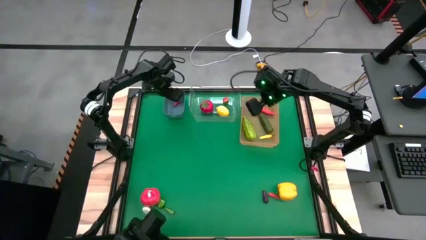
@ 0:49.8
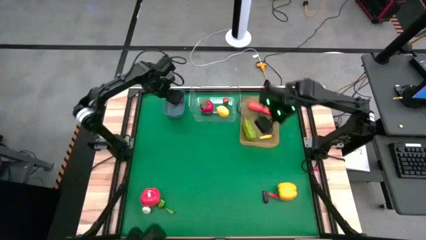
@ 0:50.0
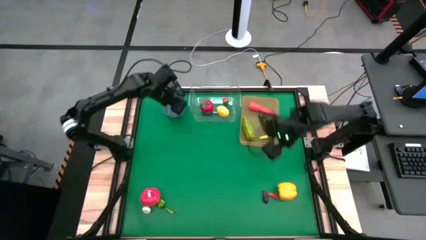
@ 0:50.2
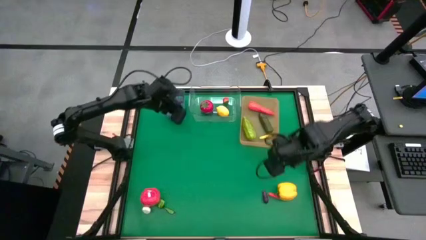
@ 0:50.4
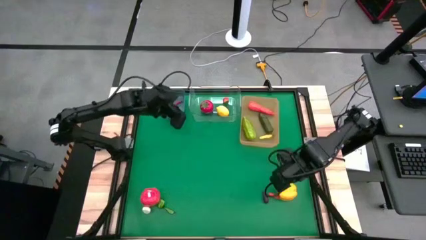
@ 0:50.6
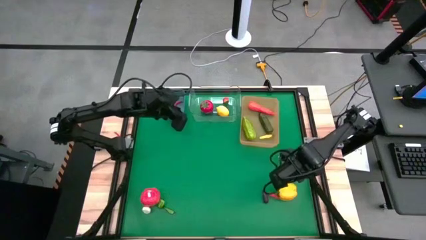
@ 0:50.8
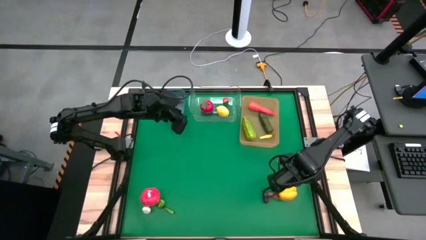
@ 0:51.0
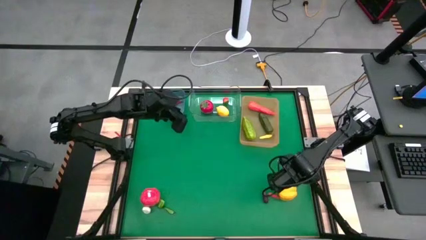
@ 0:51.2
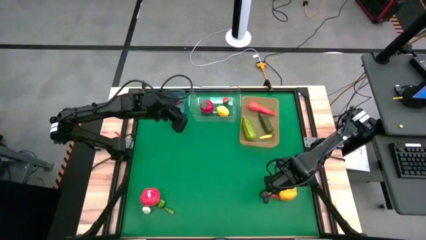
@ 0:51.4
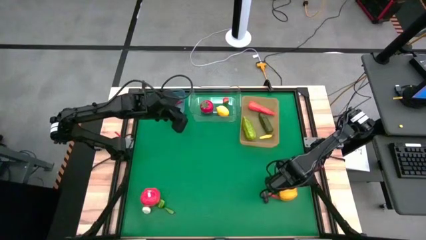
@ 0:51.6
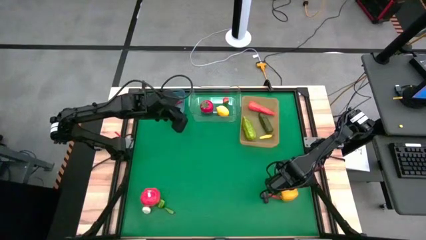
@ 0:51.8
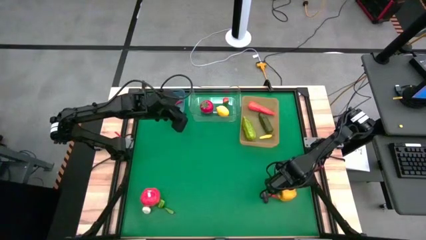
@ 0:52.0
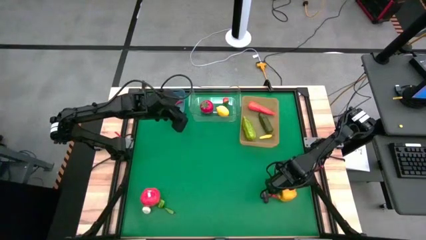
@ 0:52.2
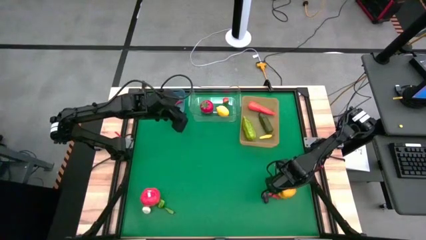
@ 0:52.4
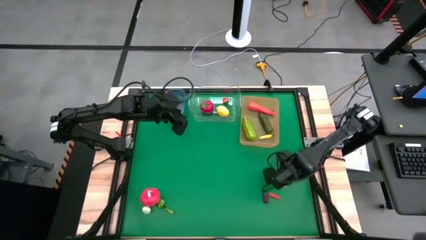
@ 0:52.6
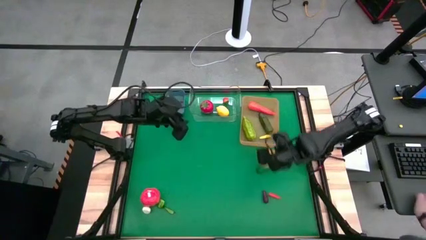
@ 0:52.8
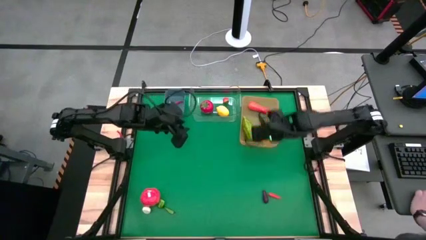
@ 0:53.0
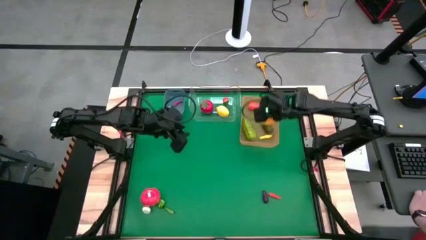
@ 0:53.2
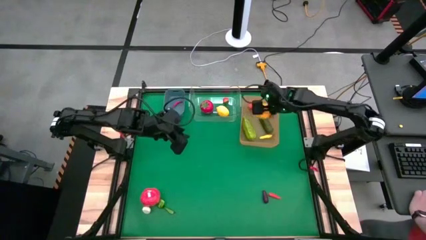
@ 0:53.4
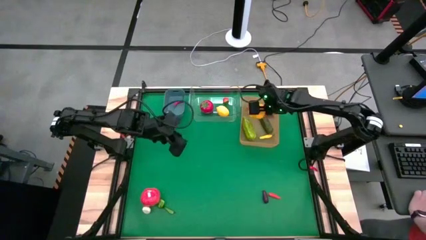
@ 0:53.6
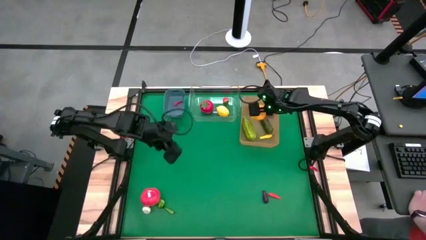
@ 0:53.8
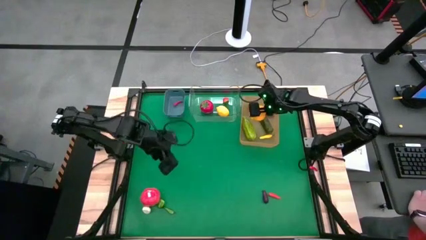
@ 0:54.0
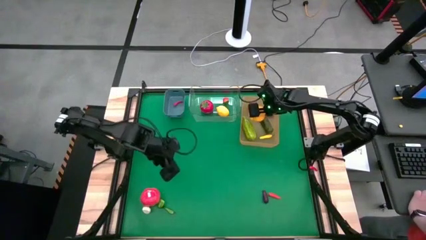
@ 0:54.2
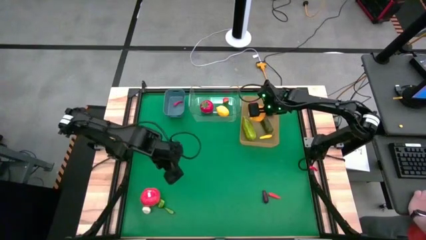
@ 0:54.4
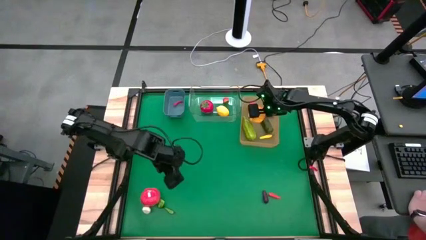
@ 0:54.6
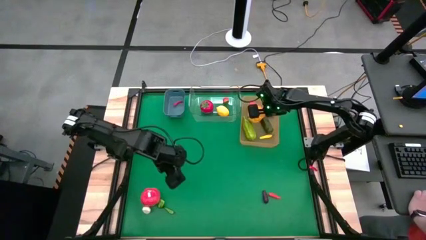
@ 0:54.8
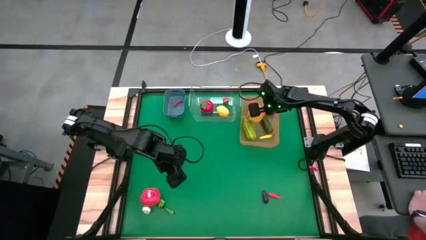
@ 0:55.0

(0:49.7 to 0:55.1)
Task: Sort produce into baskets
Put the yellow bell pepper into the orange bin

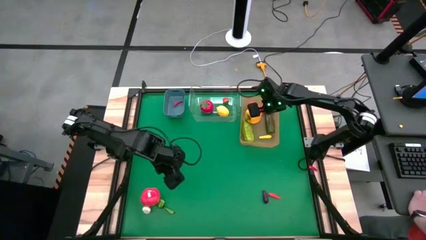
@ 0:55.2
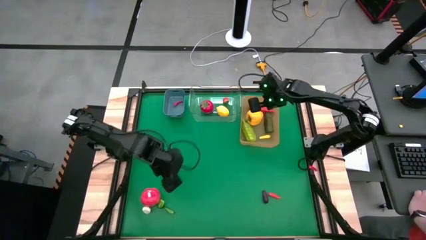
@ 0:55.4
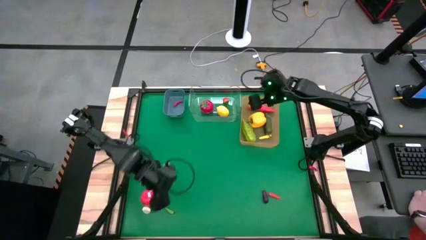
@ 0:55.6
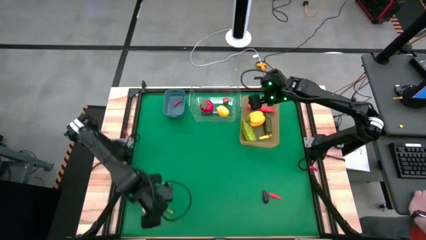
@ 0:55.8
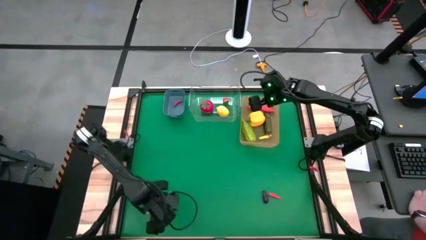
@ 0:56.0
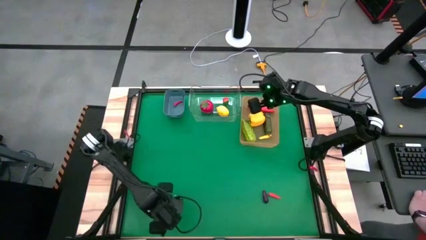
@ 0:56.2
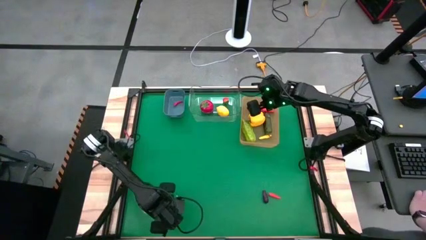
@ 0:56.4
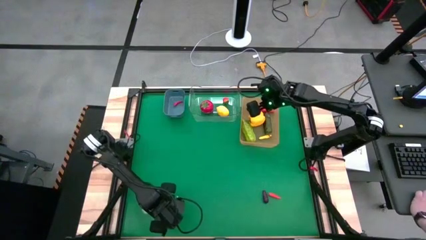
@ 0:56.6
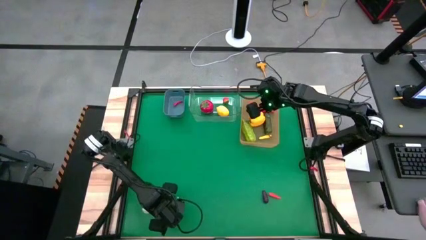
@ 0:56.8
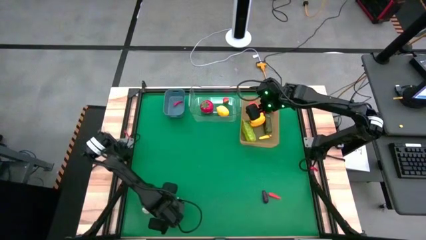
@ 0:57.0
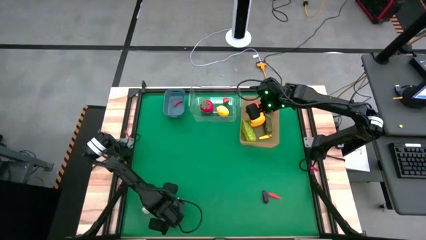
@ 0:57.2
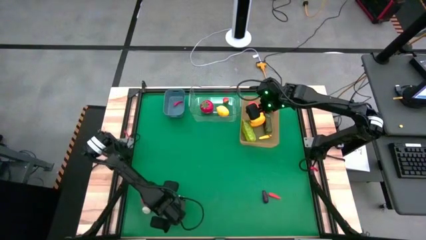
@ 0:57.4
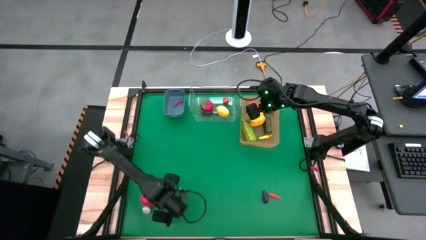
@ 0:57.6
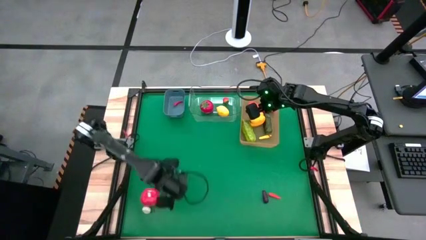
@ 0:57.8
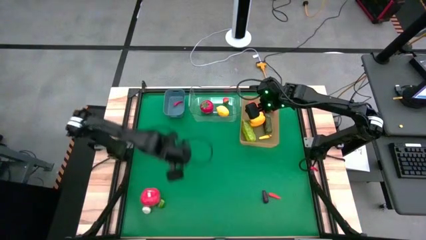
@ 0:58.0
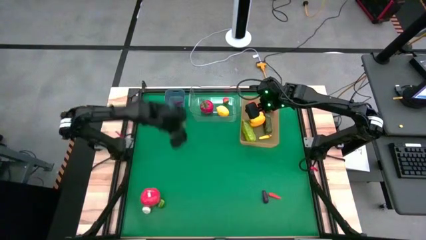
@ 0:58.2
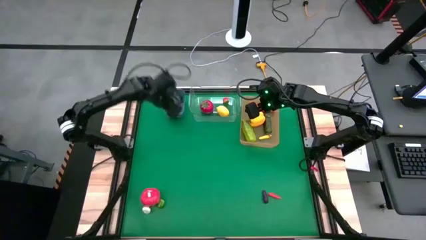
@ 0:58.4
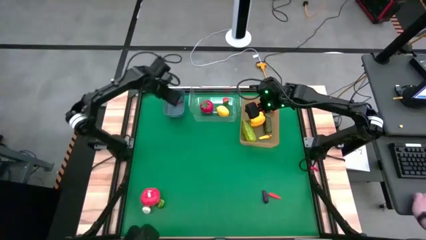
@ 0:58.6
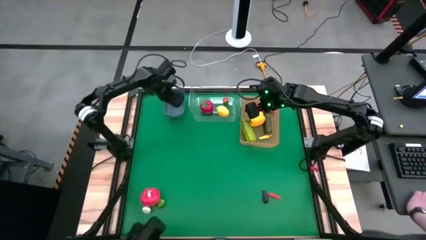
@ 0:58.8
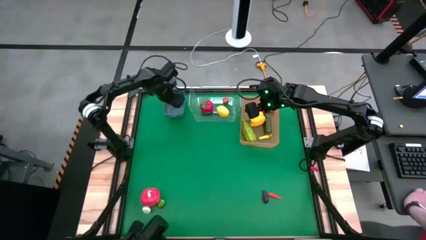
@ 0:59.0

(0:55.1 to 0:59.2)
Put the right green chili pepper into the blue bin

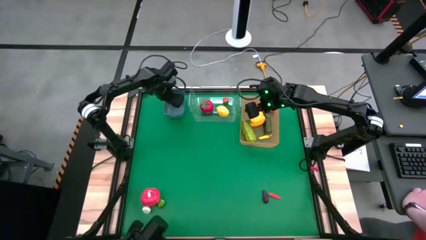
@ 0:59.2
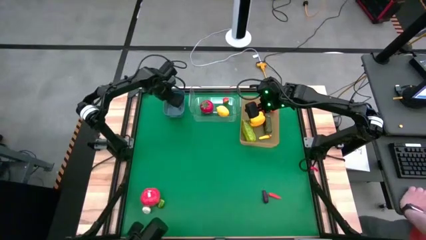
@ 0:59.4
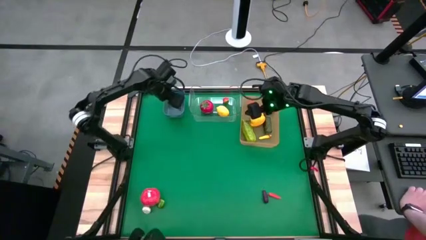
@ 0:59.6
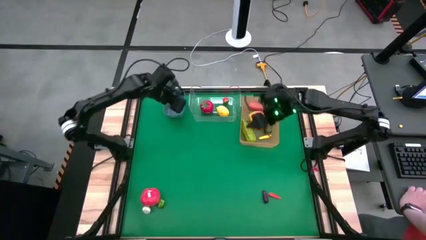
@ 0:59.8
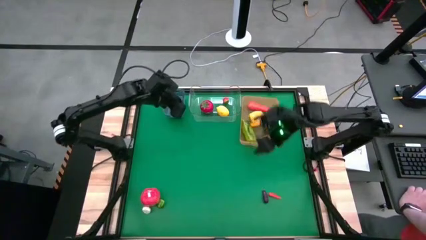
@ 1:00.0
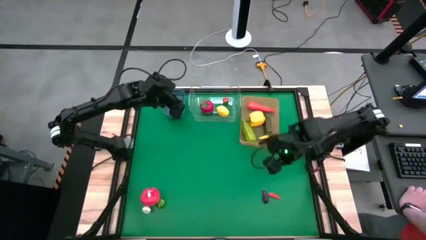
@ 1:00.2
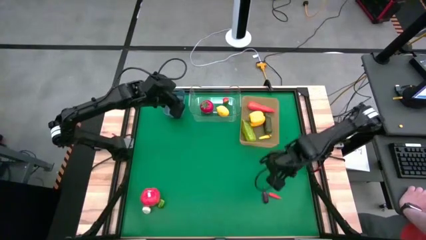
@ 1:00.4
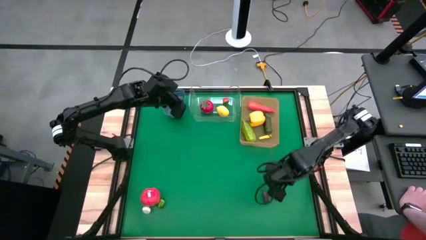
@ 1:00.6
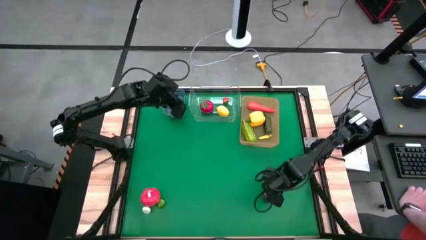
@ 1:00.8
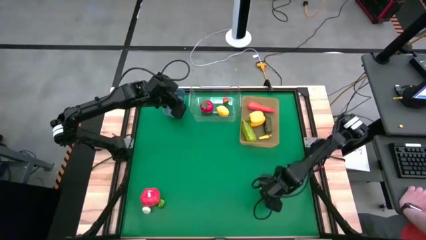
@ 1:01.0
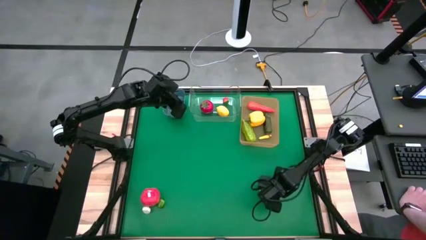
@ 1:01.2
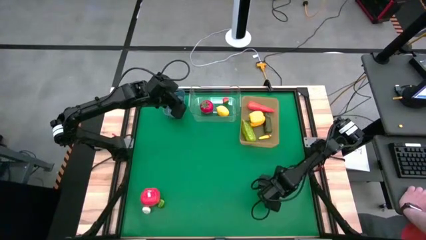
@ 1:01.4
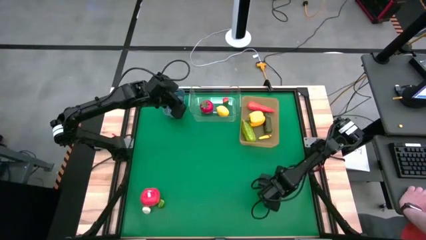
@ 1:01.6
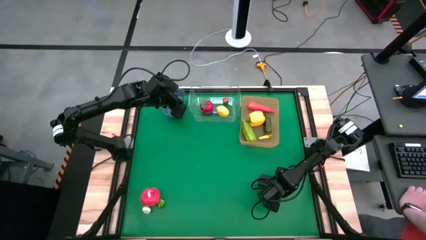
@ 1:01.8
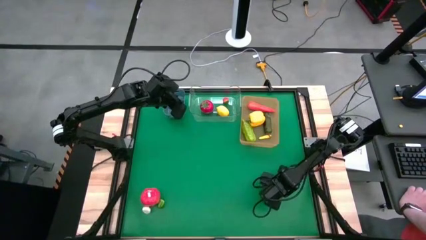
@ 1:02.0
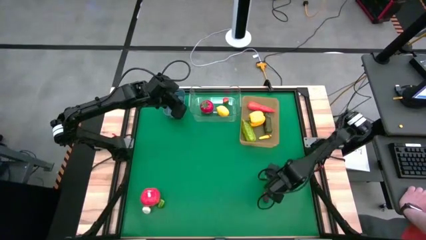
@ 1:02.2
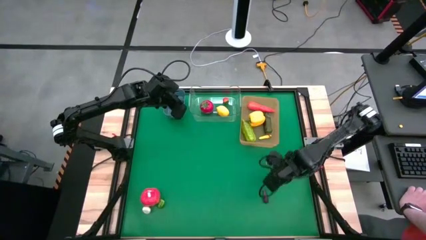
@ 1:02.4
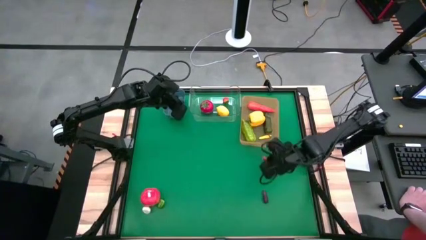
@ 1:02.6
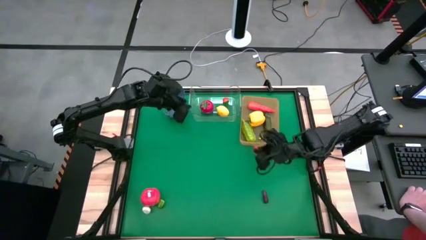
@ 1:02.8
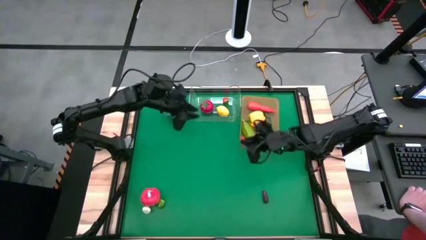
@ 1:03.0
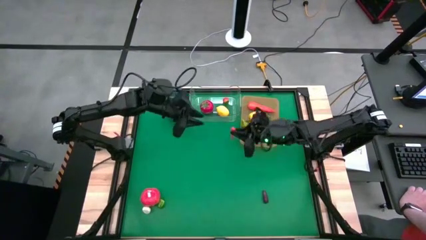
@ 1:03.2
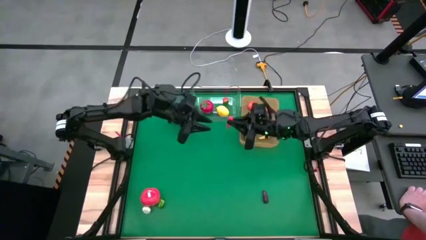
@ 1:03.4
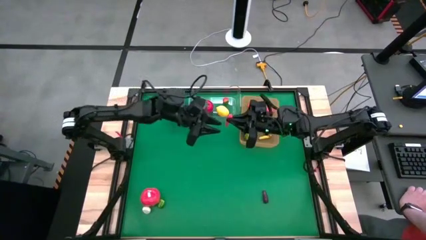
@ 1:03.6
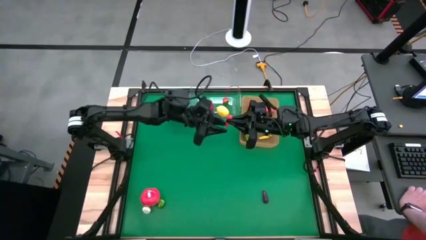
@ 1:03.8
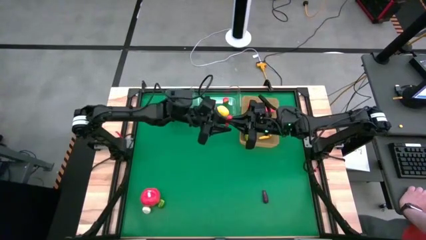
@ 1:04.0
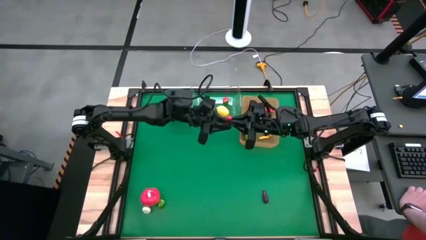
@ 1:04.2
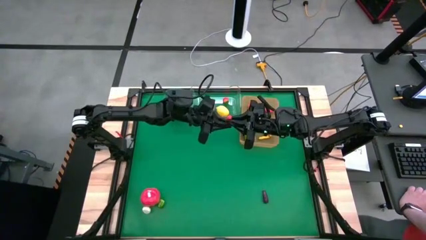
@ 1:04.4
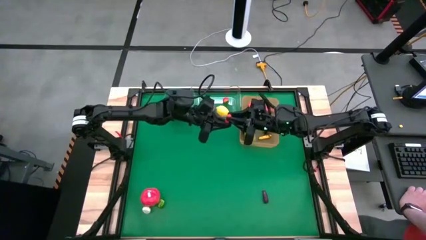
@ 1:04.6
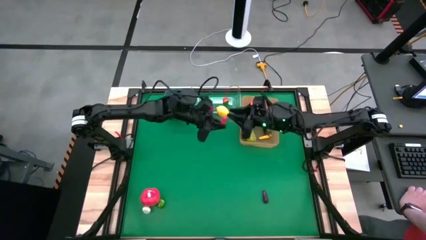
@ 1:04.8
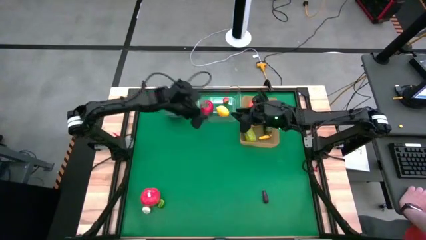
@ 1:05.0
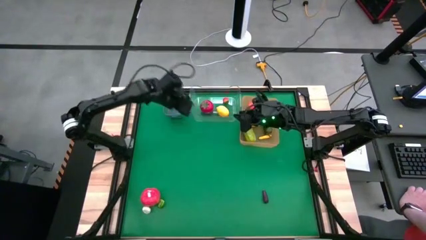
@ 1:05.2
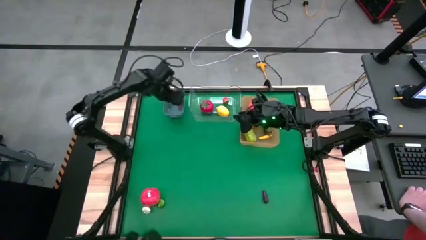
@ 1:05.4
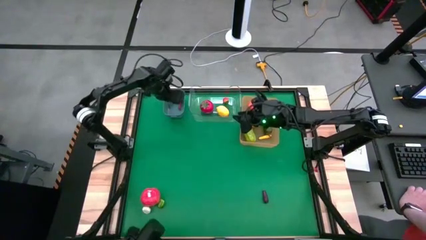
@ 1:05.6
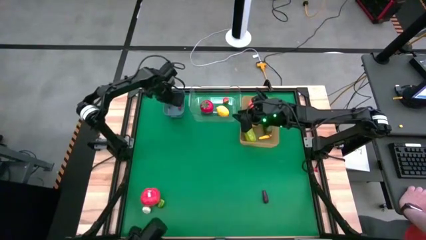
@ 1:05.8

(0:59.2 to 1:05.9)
Put the orange chili pepper into the blue bin

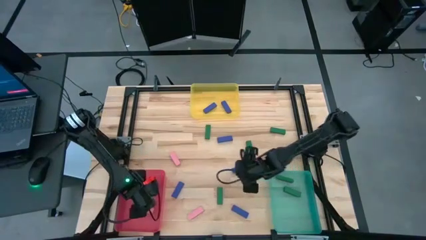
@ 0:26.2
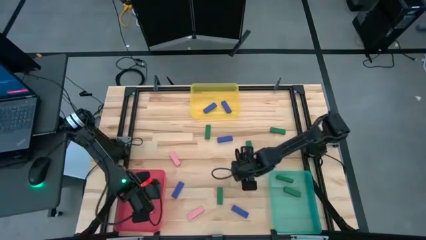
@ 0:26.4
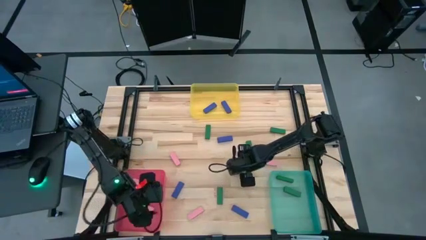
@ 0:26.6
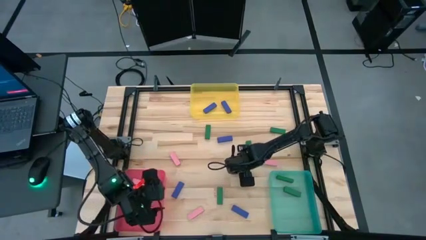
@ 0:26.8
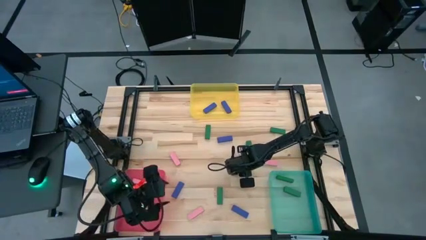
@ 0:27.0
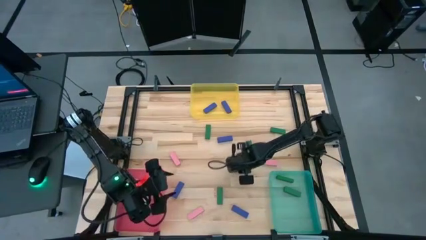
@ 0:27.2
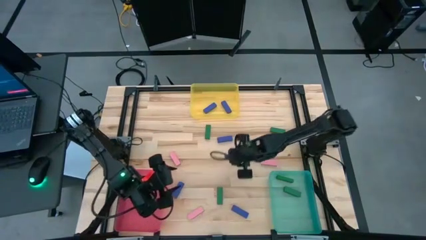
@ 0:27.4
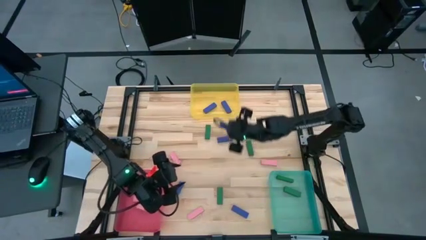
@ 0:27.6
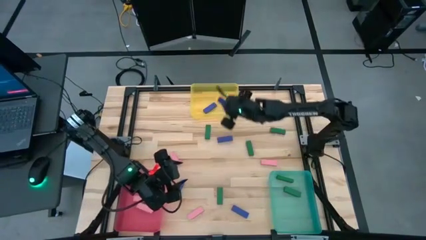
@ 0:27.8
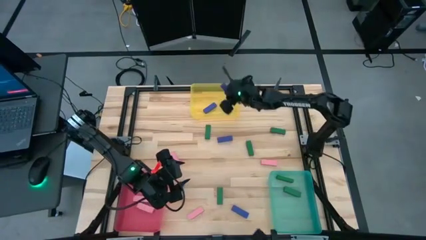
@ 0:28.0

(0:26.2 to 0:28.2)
Task: Sort blocks
Put the blue block into the yellow bin
